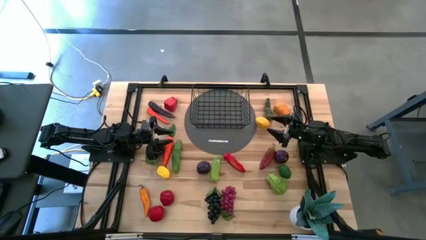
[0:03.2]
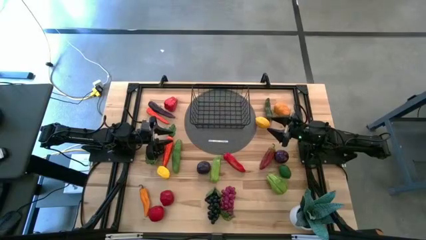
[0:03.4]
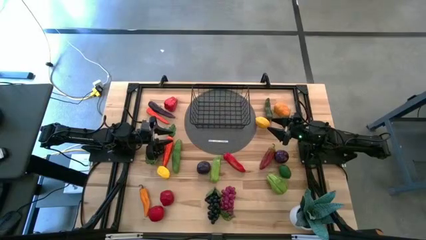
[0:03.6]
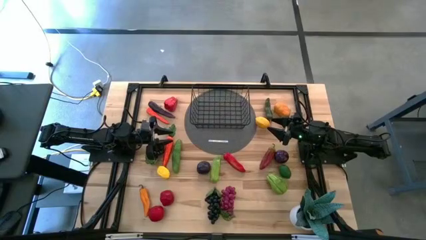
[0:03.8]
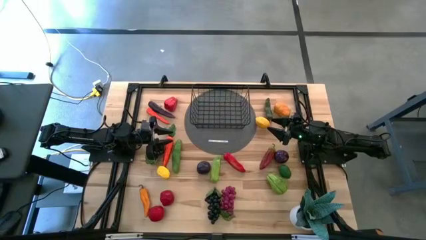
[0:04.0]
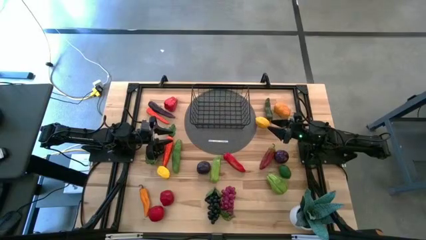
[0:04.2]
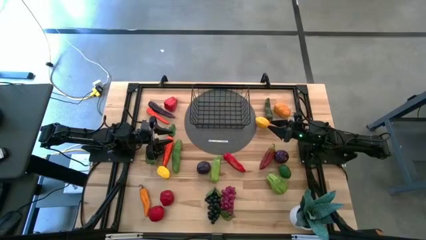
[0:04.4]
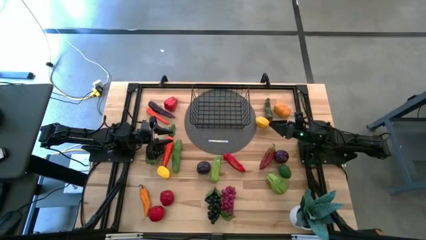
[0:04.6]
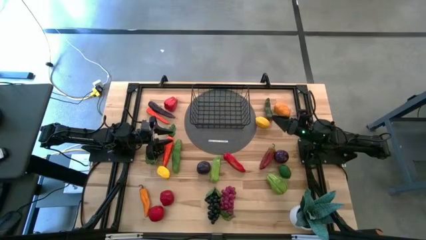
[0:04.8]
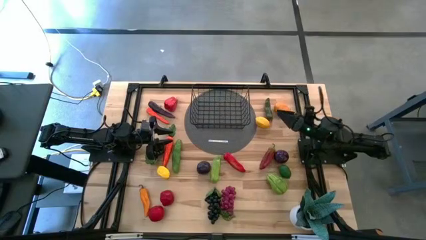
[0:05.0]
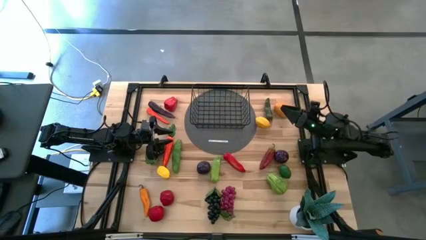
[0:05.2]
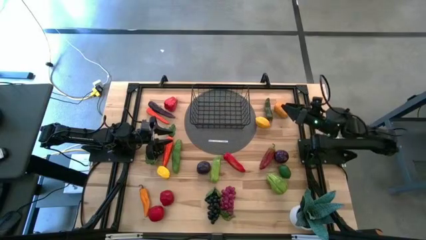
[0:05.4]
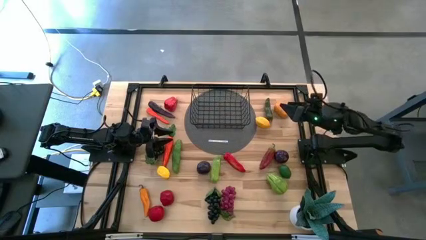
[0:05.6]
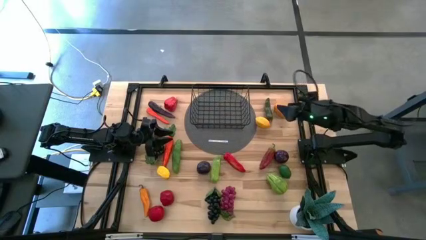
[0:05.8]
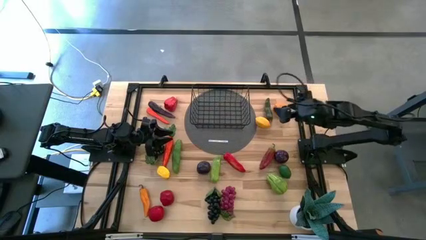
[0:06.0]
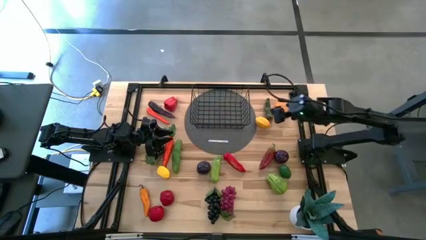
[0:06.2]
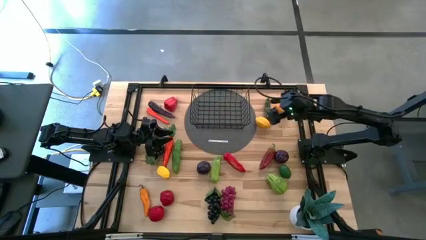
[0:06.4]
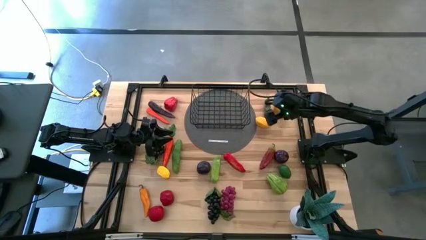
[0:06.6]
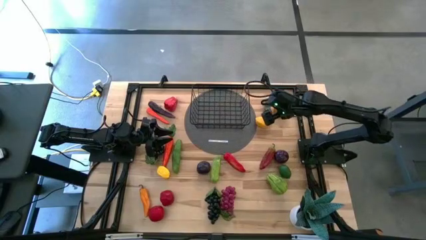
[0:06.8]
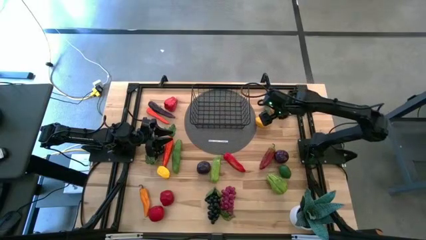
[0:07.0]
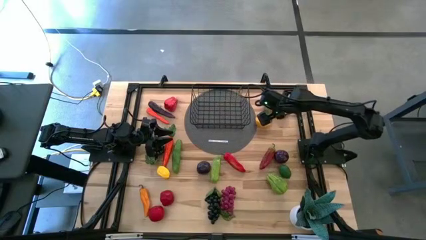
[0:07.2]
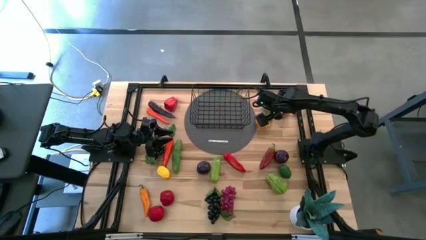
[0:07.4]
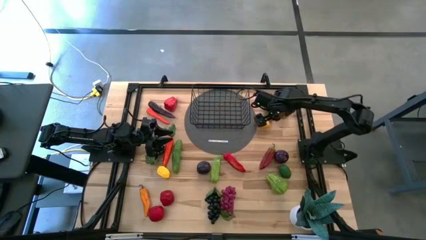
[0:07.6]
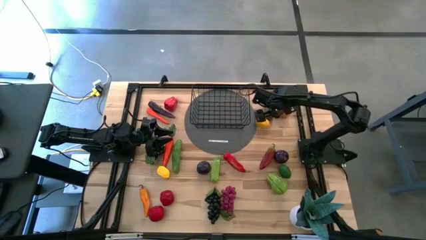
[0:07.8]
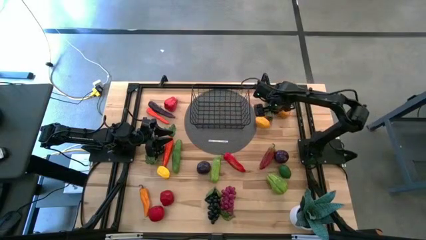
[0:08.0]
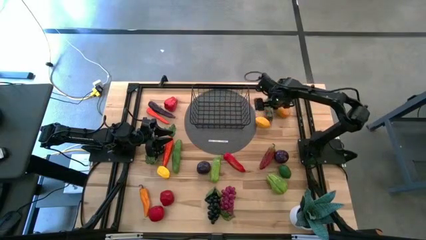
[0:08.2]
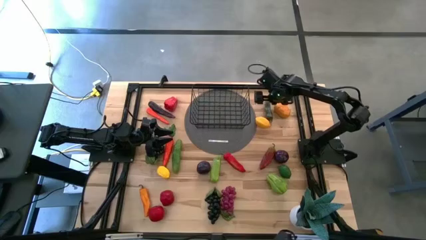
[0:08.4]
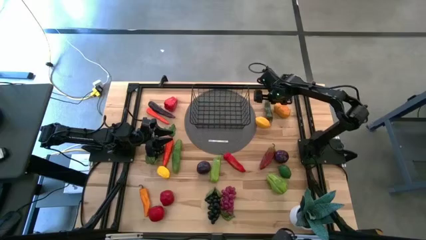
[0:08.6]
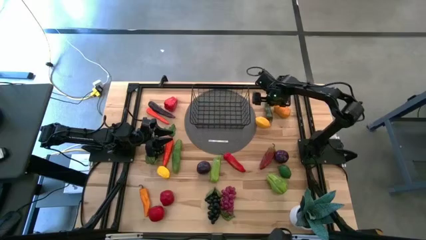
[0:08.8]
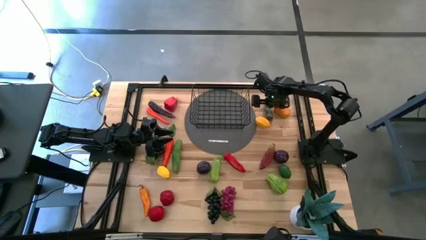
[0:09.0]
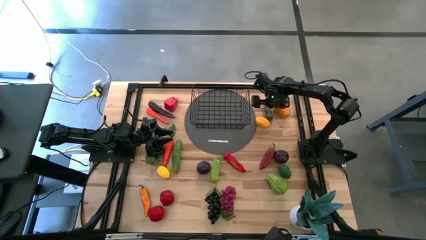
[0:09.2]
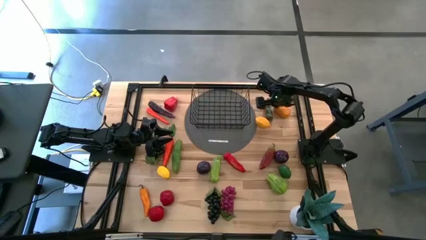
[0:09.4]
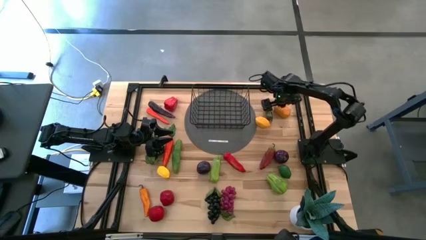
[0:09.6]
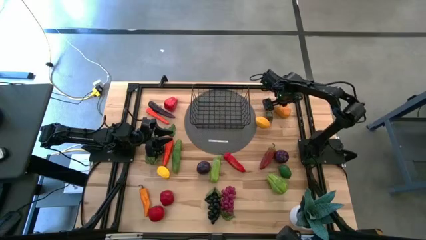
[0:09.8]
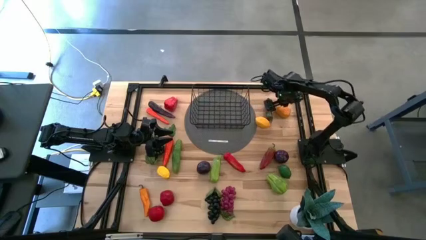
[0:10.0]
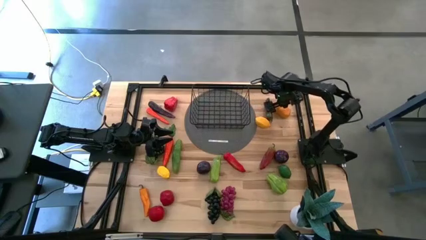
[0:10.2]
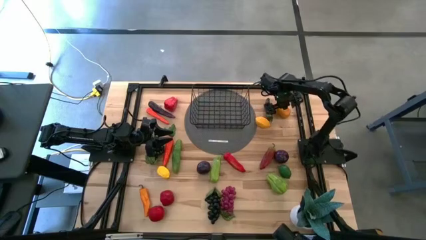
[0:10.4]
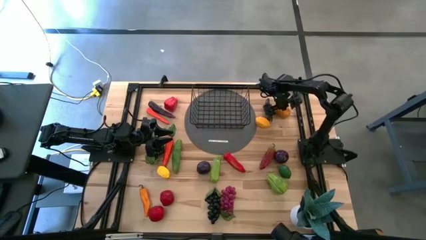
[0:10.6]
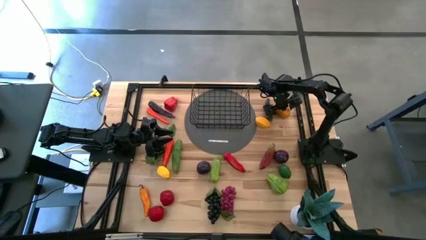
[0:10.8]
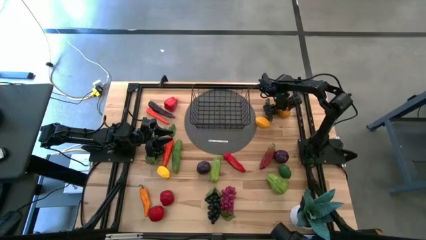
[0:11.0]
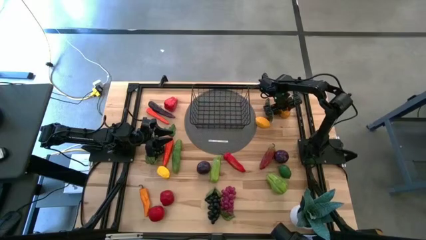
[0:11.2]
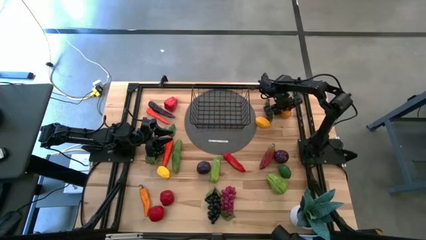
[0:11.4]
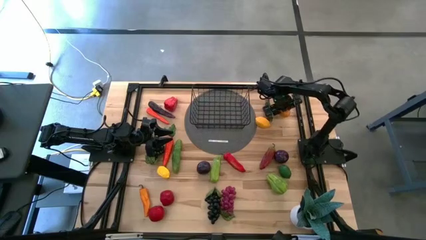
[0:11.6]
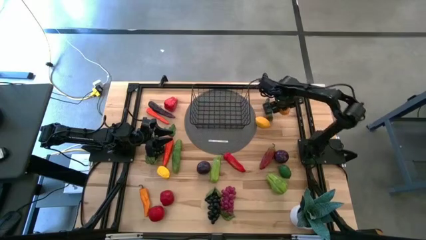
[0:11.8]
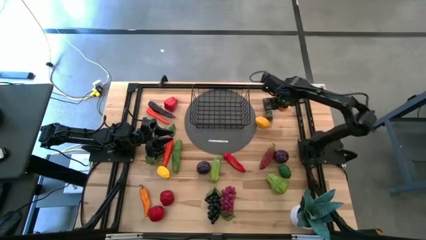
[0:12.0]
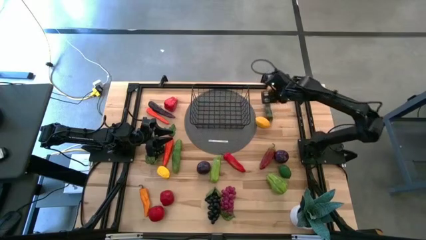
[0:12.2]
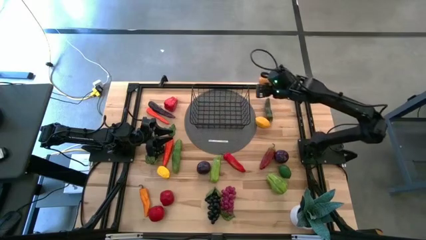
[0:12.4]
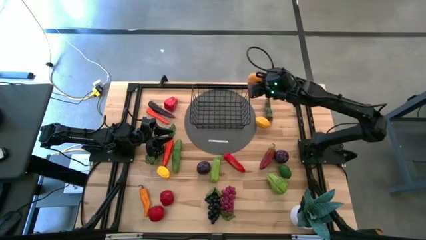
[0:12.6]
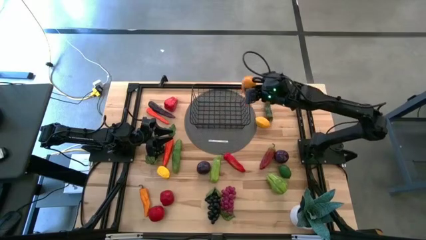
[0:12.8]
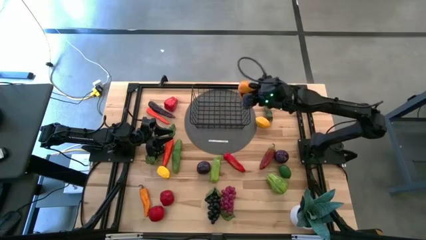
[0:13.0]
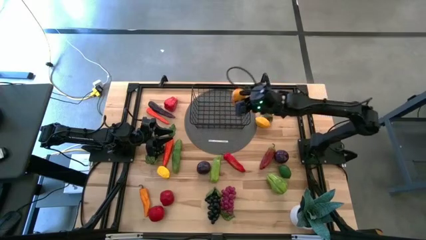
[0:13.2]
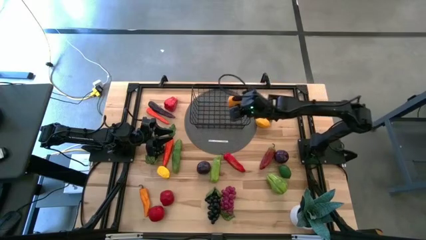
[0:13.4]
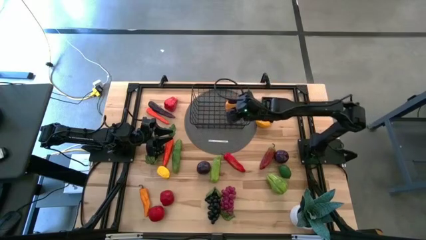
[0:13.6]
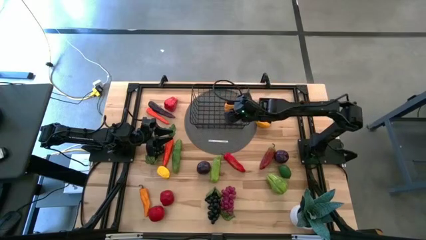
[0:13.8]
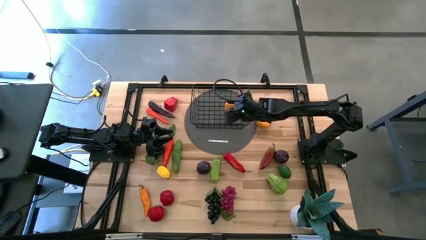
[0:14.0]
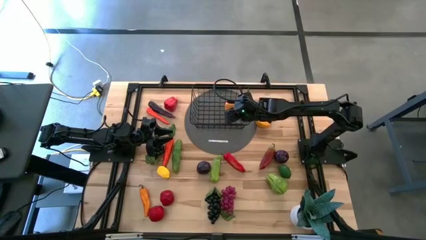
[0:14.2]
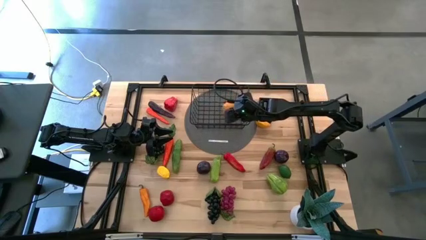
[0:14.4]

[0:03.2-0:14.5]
Task: Build produce basket
Put the yellow mango into the black wire basket

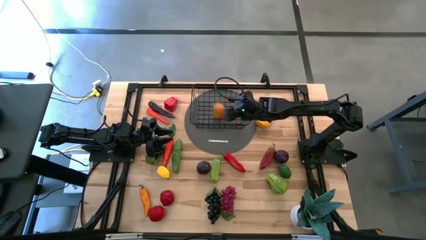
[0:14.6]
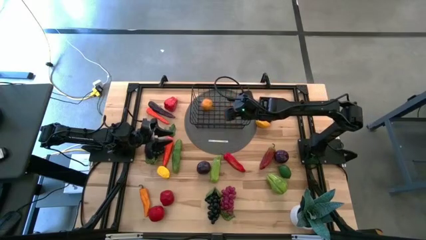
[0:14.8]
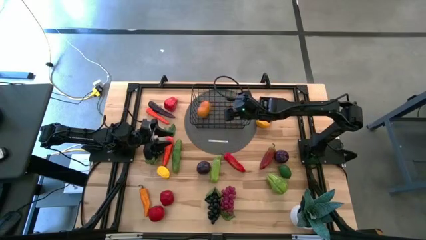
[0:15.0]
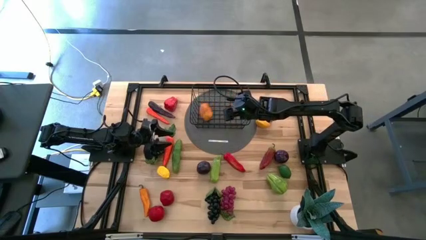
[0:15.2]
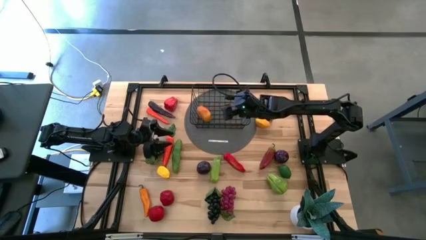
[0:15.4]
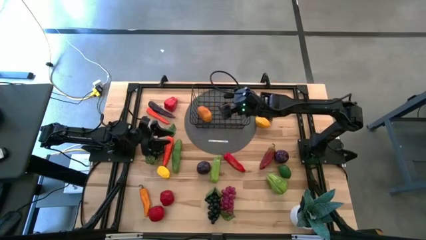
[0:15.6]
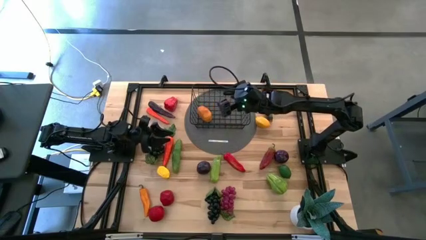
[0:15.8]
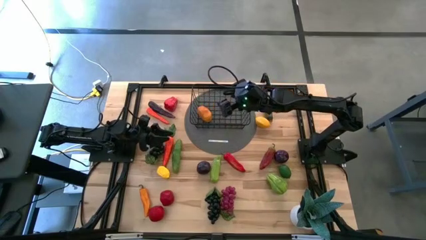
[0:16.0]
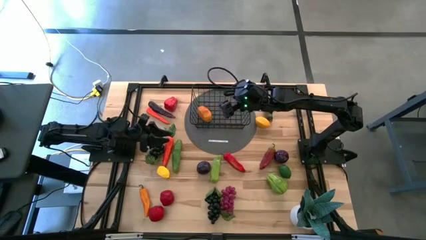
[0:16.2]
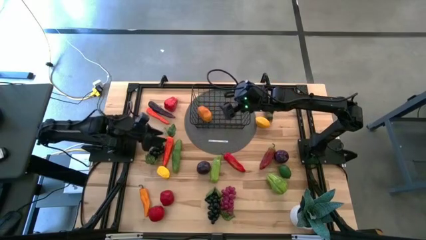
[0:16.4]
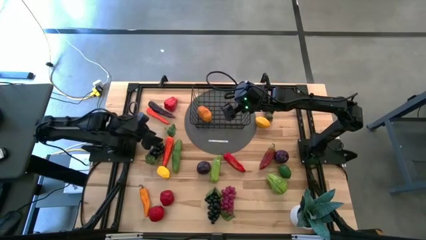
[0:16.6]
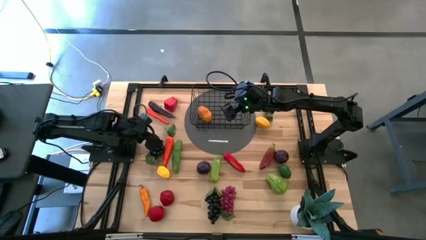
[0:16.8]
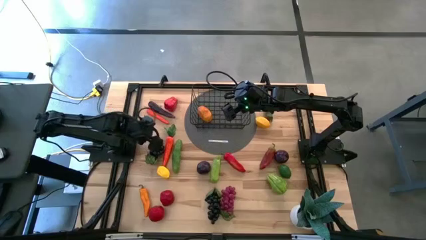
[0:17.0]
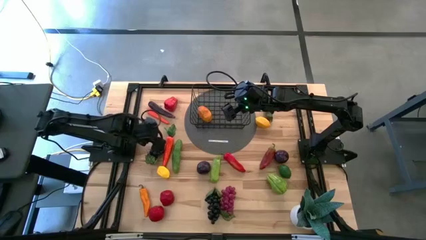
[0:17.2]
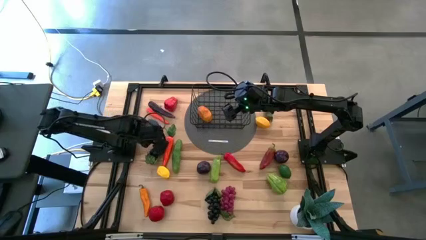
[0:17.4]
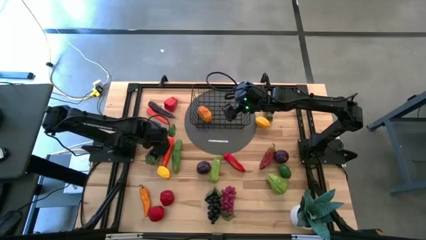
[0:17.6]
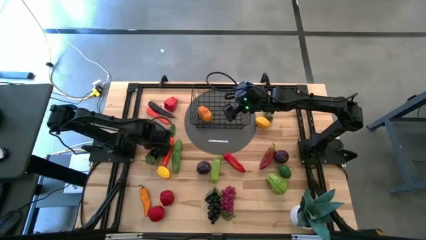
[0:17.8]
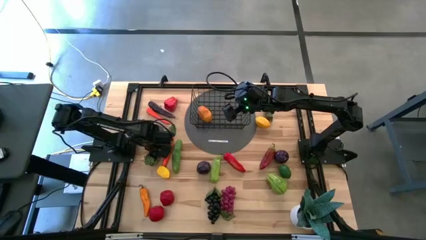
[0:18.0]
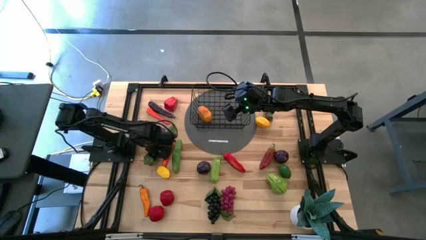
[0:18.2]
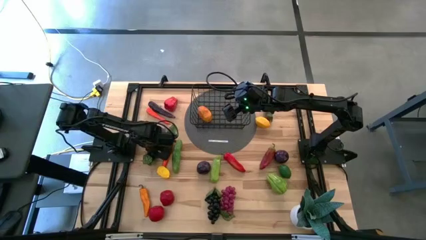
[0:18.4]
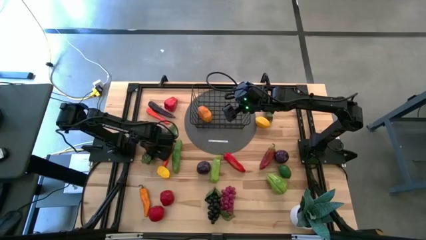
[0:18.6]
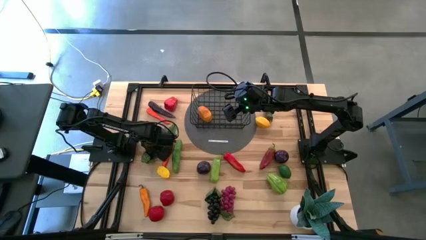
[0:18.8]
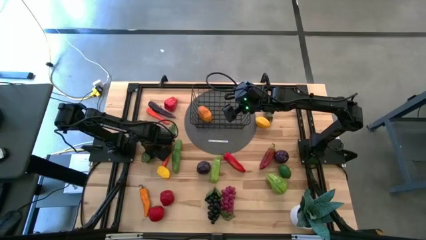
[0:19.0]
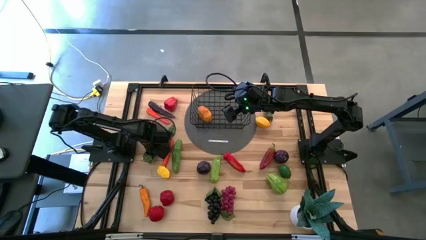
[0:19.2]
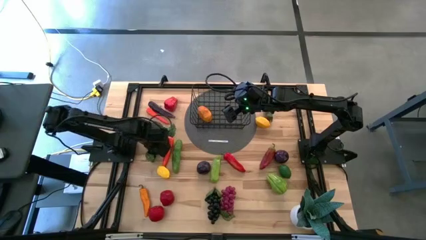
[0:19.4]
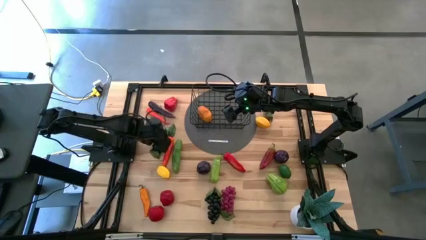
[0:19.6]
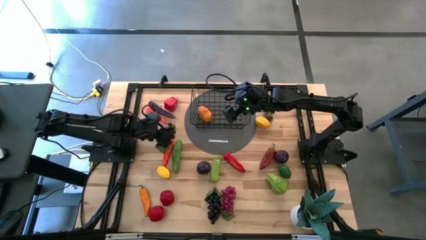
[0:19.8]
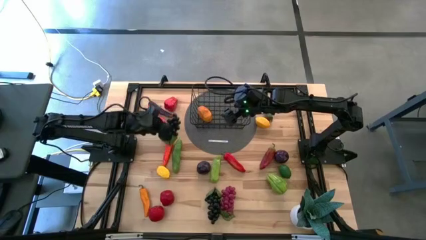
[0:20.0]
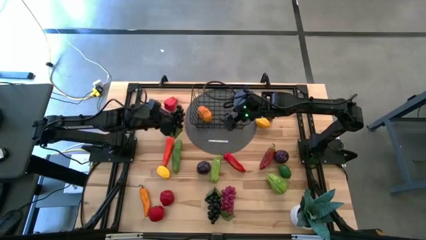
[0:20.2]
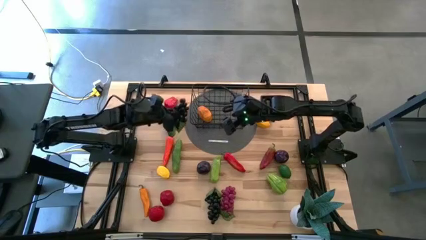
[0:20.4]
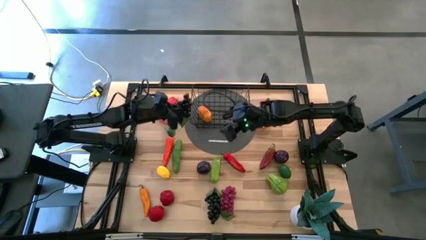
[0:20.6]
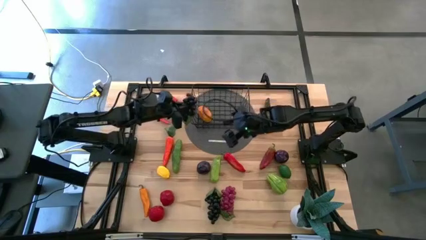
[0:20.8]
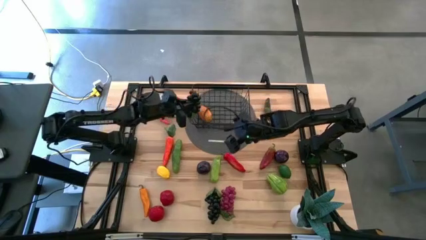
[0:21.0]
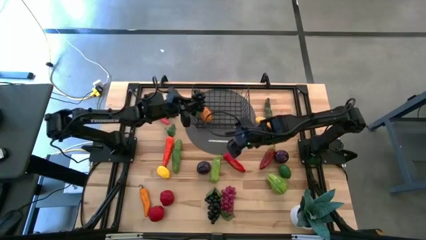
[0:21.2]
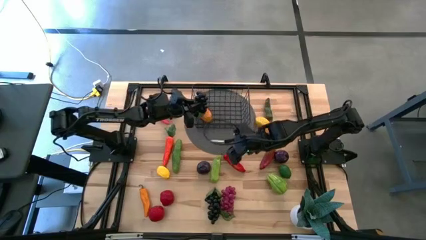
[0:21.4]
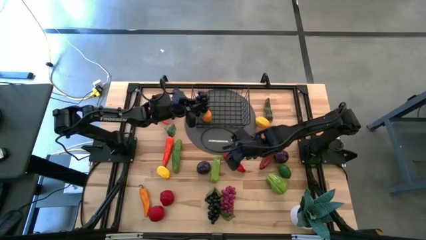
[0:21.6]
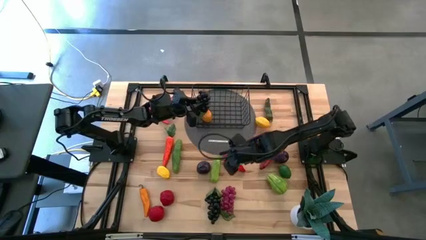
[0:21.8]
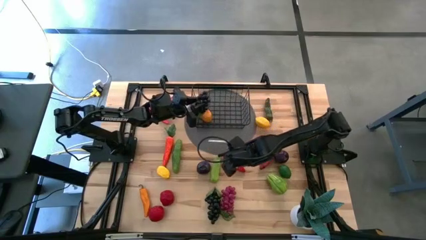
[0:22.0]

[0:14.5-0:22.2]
Put the top black grapes into the black wire basket
